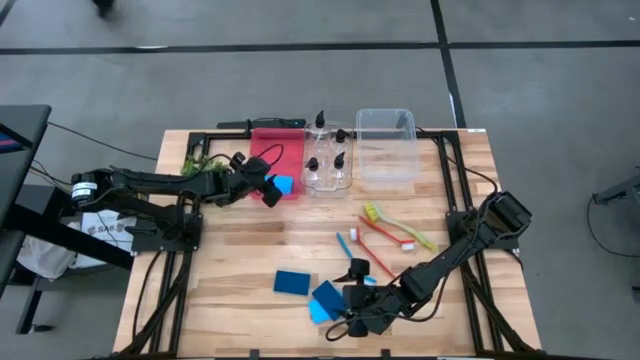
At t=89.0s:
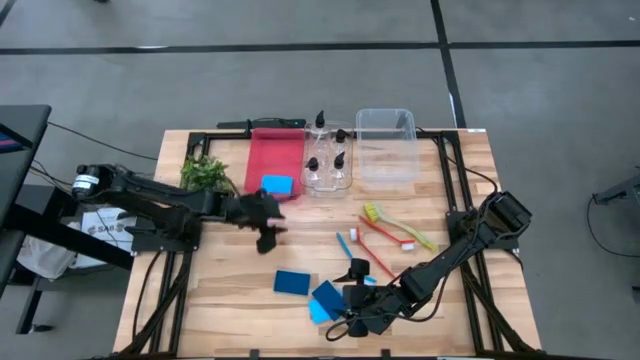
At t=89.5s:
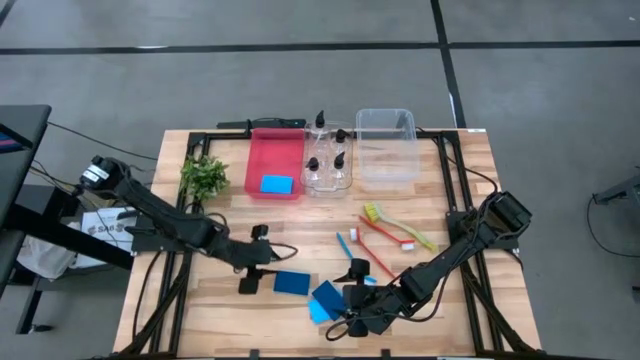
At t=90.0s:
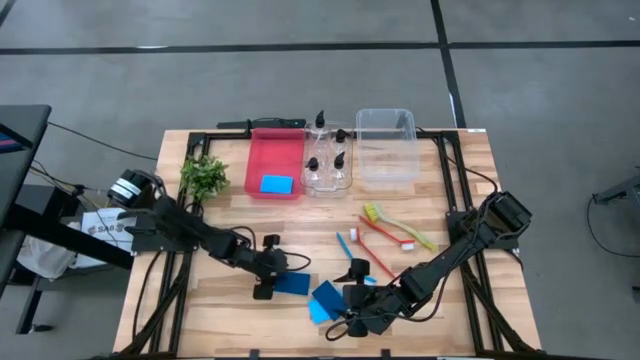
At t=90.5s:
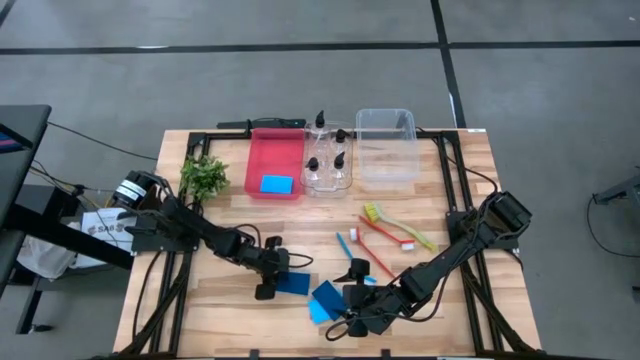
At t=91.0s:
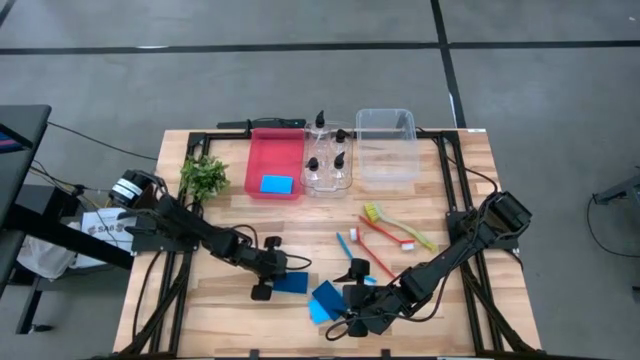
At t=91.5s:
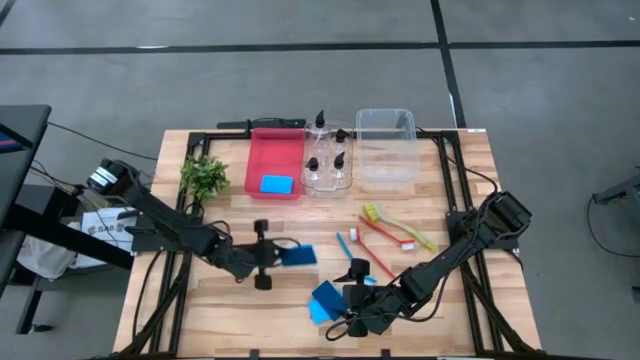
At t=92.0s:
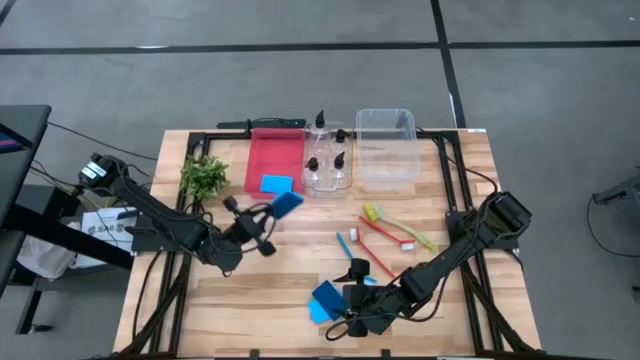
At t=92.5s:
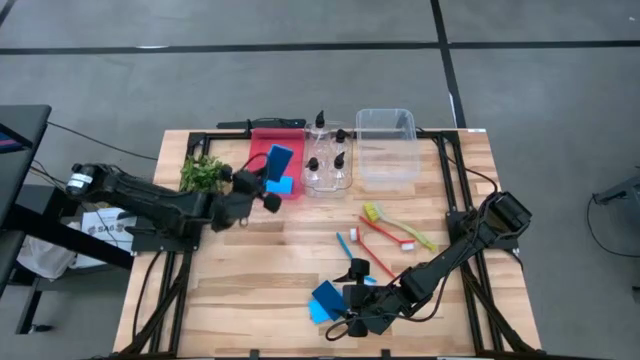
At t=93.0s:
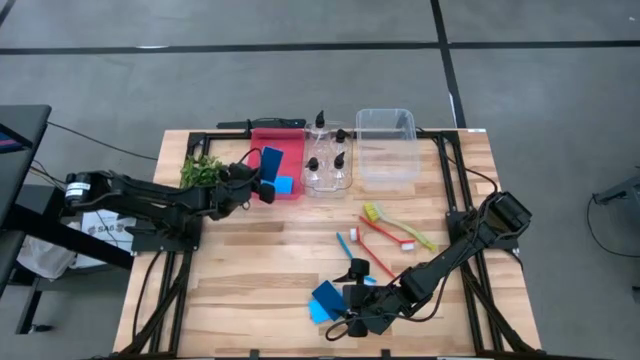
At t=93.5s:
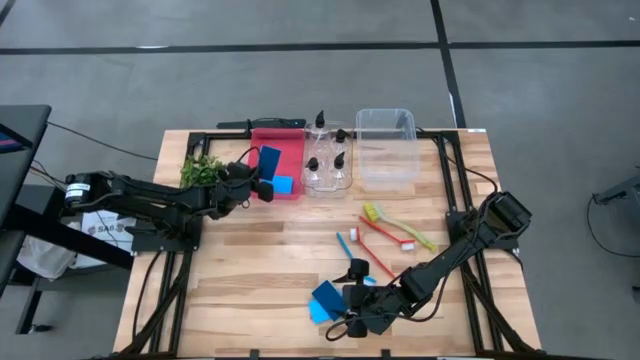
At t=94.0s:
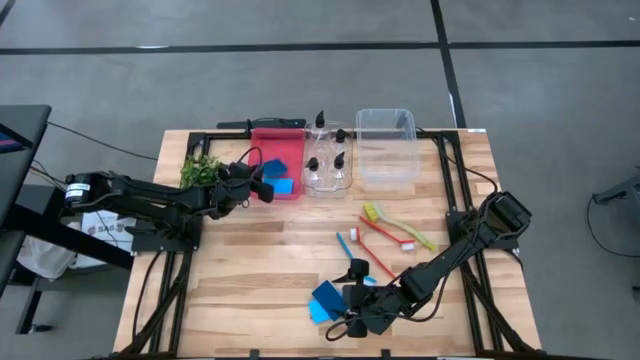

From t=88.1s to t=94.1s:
Task: Pick & Place Kitchen Sink Supplies
Put the blue sponge into the pink bin

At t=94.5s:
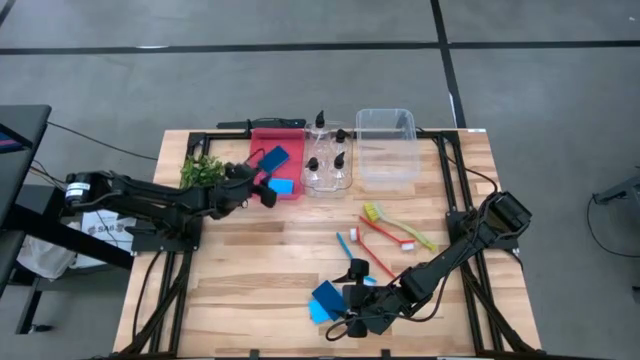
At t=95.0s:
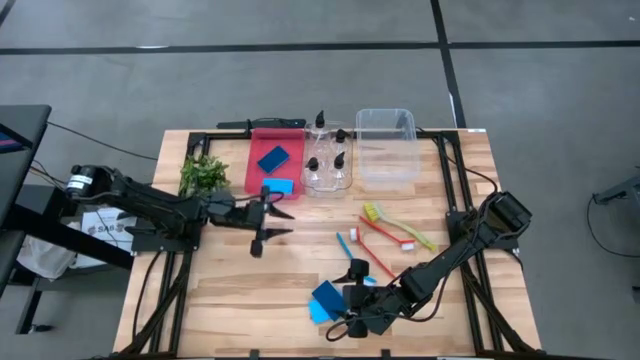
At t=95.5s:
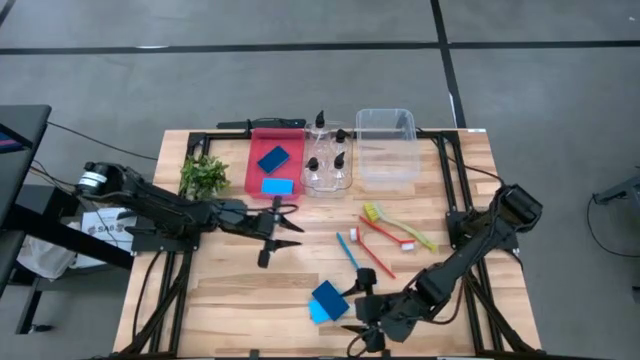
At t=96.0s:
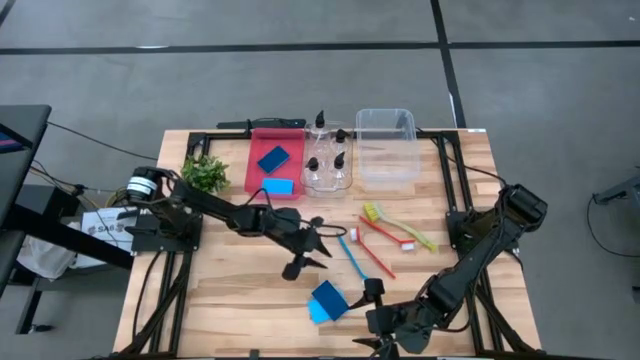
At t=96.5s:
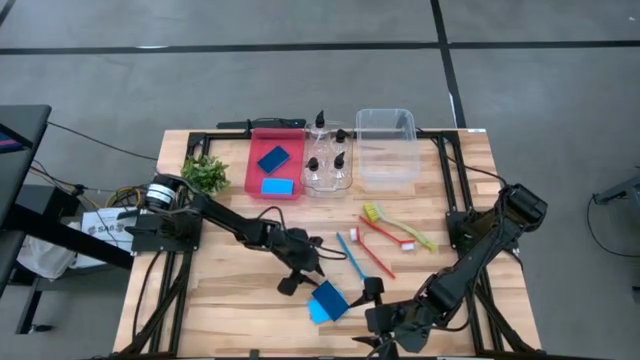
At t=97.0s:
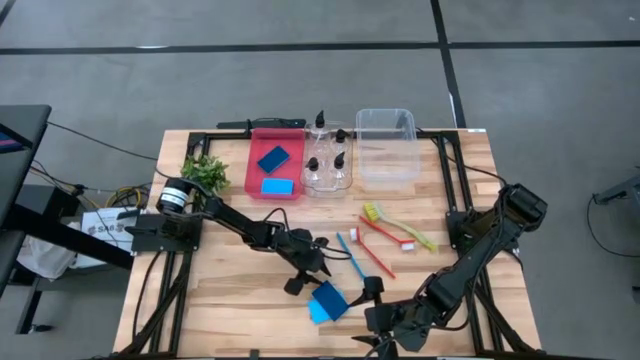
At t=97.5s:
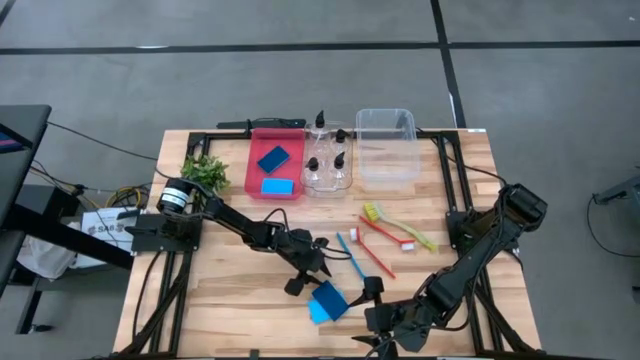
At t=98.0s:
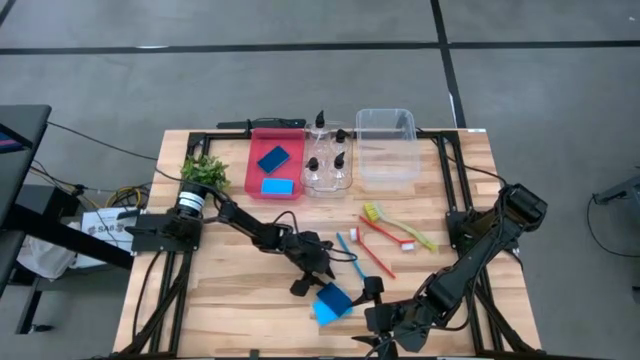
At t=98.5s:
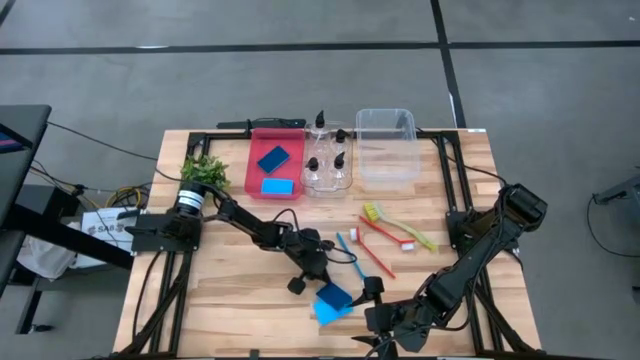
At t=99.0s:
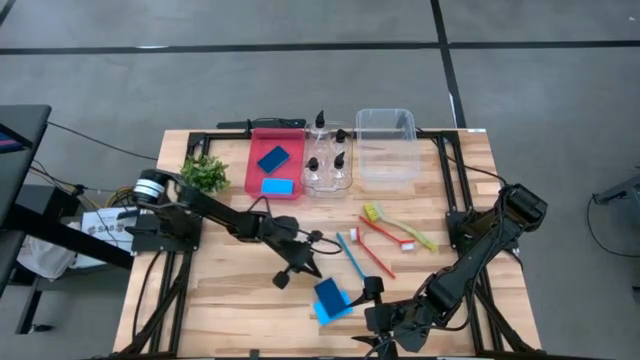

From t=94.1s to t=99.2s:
Put the blue sponge into the pink bin

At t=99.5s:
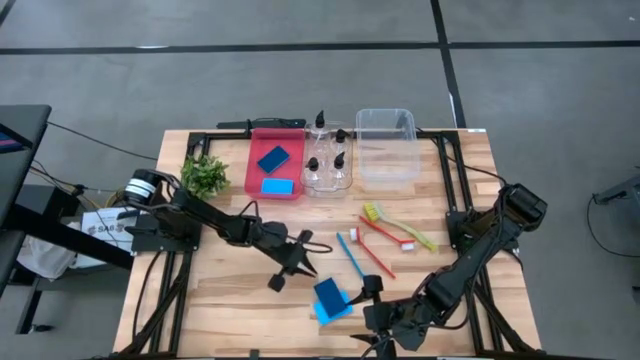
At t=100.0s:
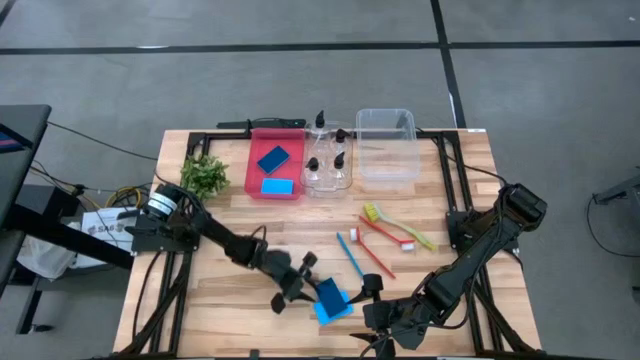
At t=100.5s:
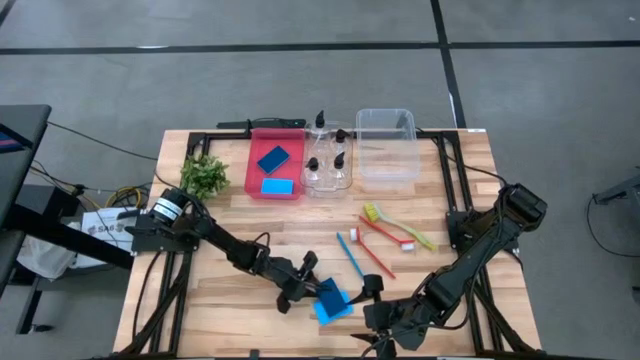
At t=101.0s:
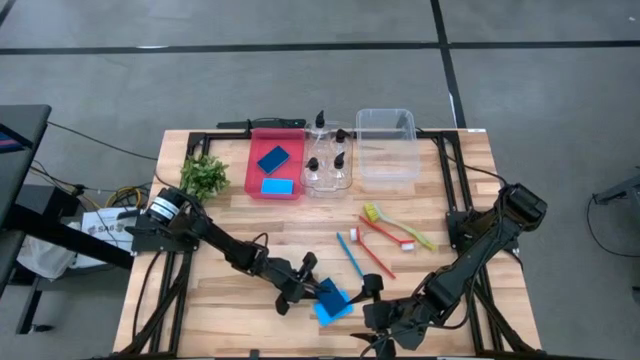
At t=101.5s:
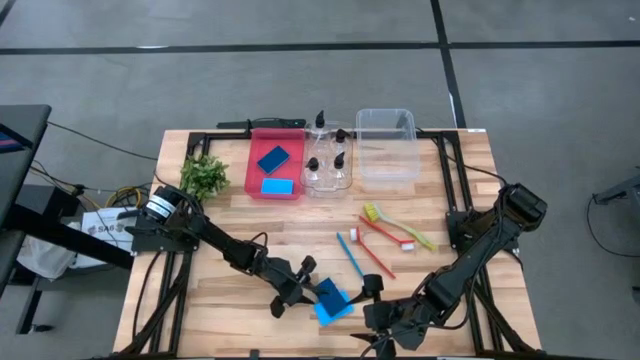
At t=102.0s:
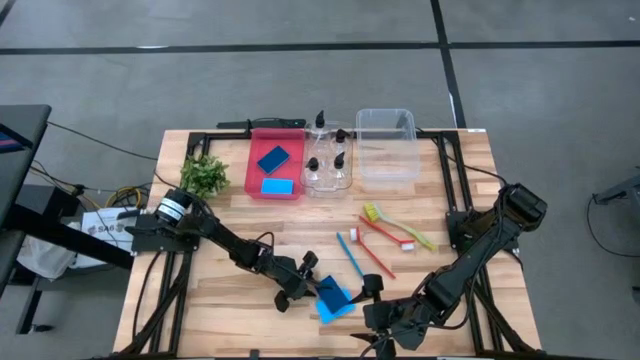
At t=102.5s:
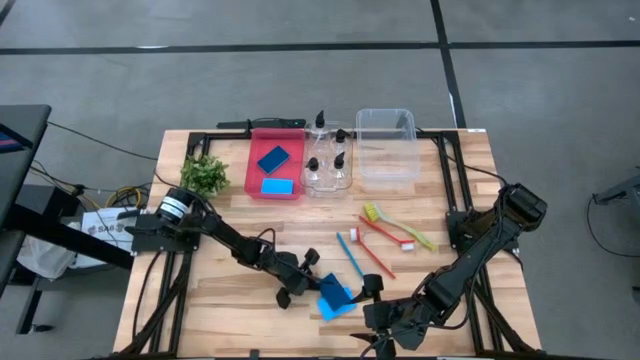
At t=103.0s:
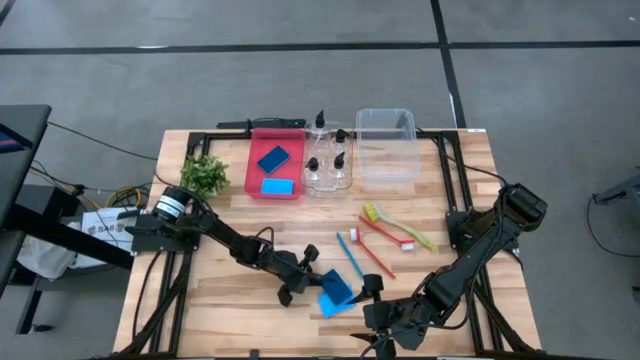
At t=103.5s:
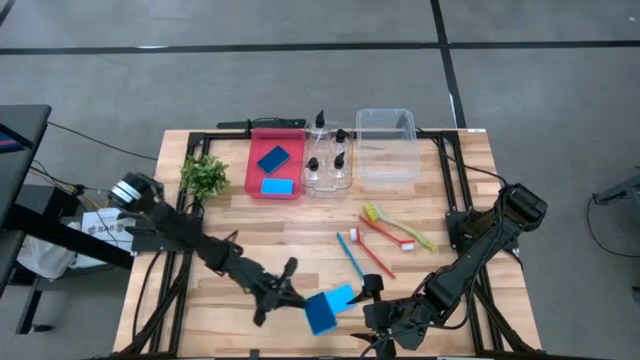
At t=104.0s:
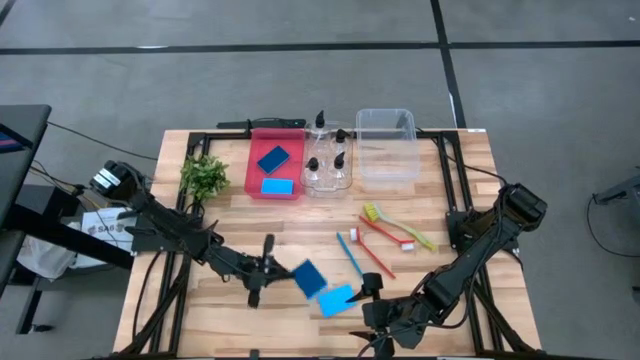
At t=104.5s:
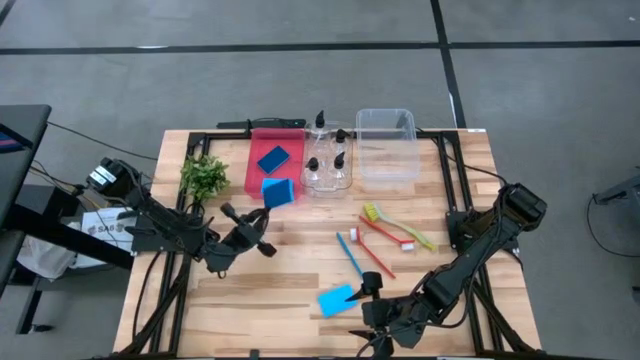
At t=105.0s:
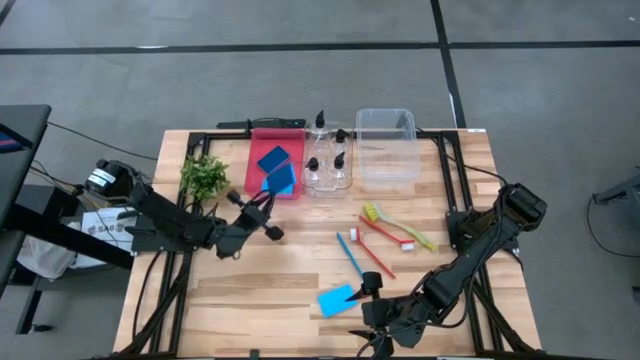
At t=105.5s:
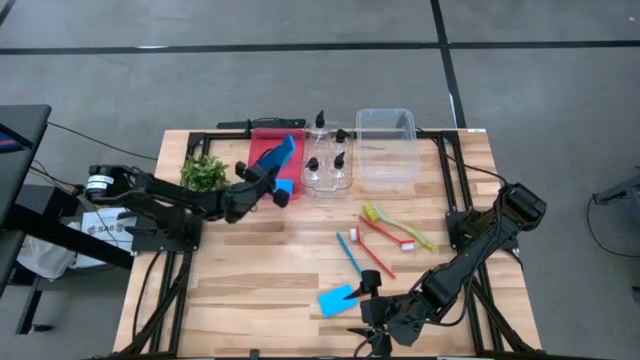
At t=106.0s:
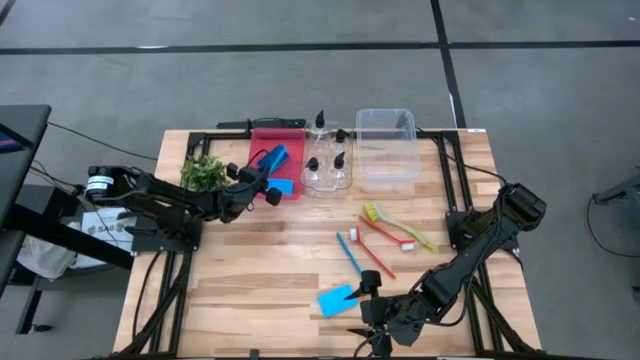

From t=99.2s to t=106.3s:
Put the blue sponge into the pink bin

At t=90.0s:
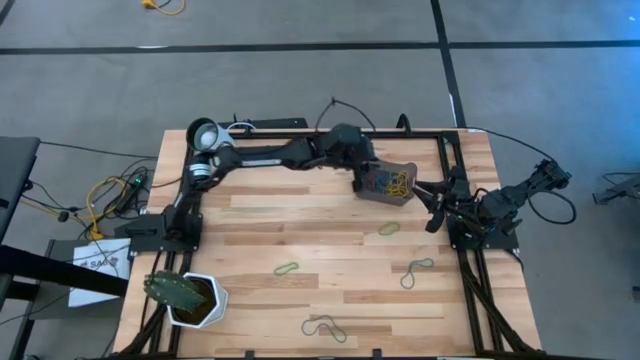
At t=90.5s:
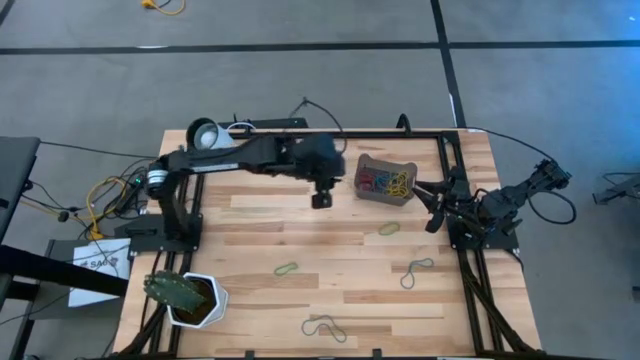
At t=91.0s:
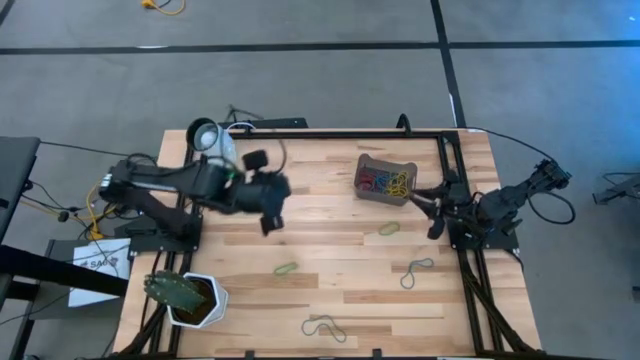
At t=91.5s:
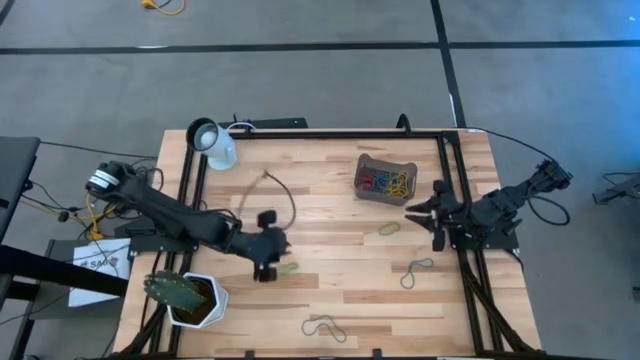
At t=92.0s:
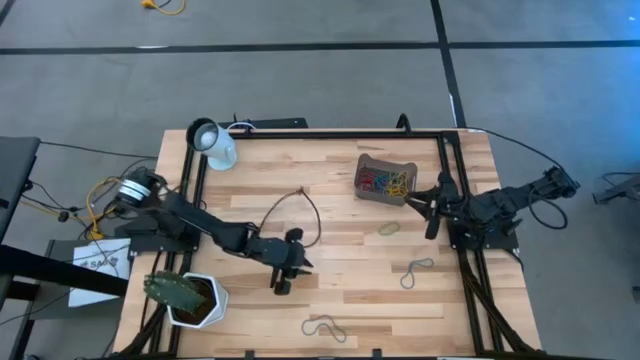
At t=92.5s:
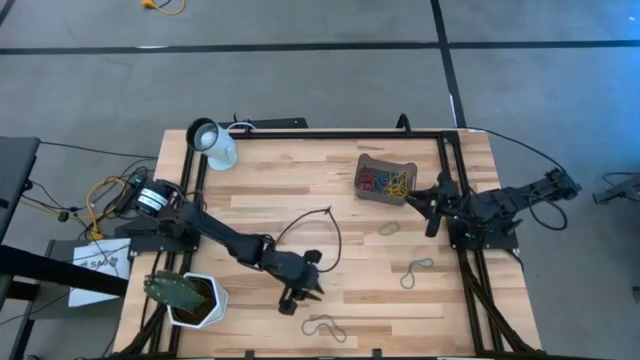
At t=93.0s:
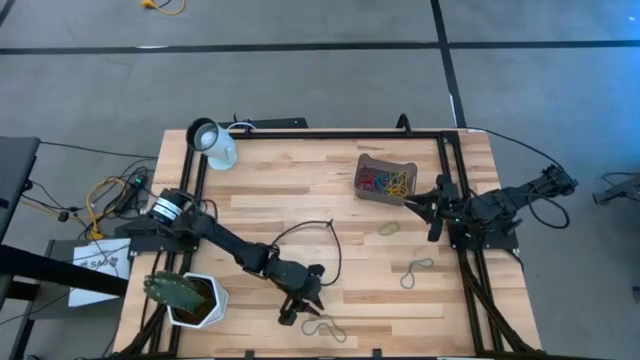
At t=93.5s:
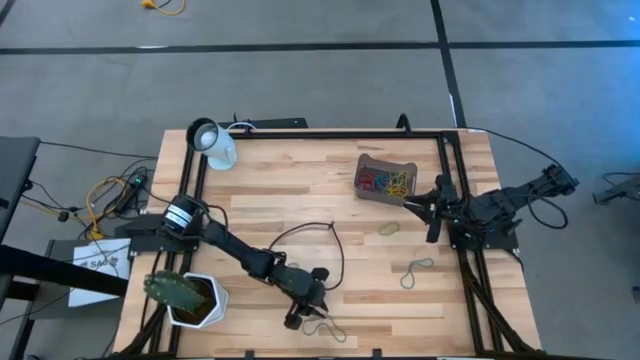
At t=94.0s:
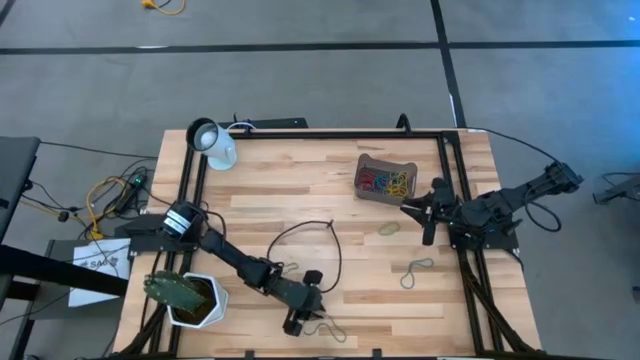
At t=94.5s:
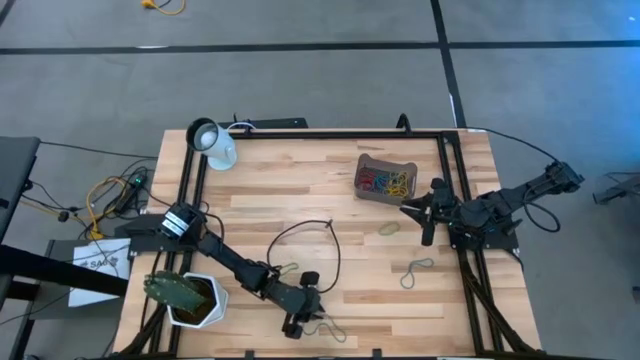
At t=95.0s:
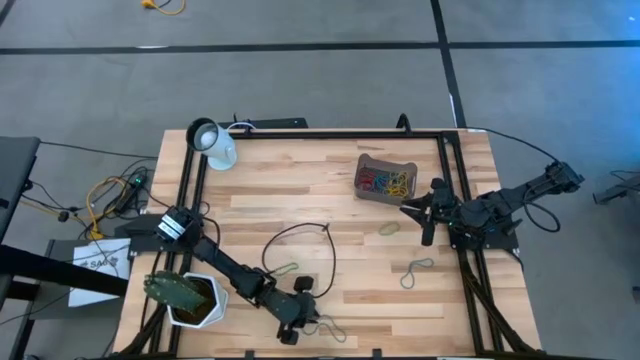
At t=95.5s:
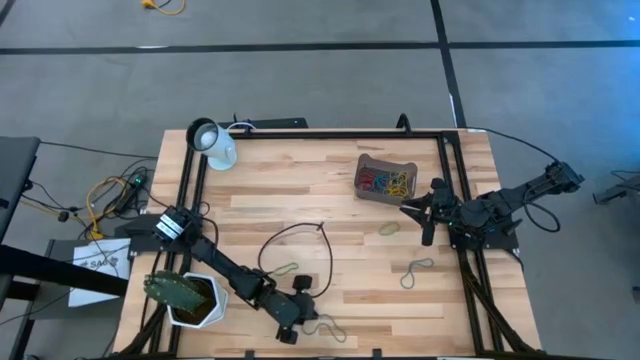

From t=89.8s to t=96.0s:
Task: Pick and place rubber bands into bin
Put the blue rubber band into the black container
